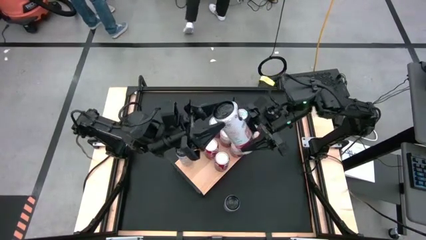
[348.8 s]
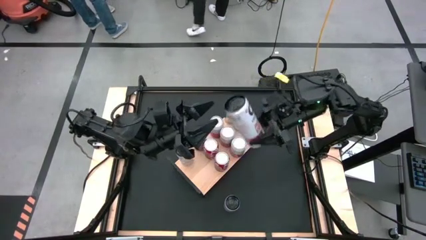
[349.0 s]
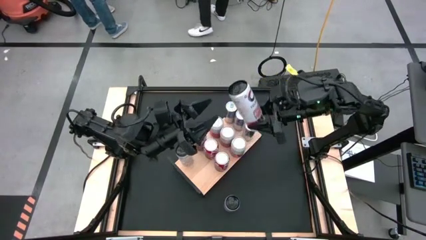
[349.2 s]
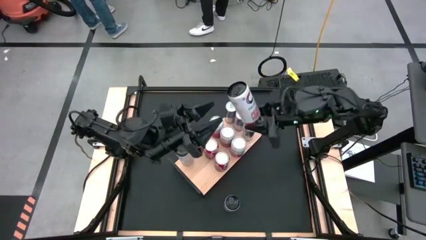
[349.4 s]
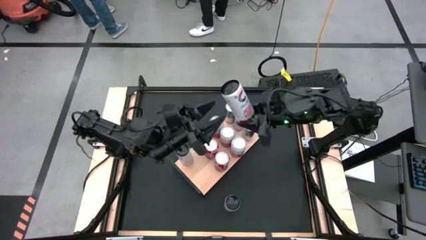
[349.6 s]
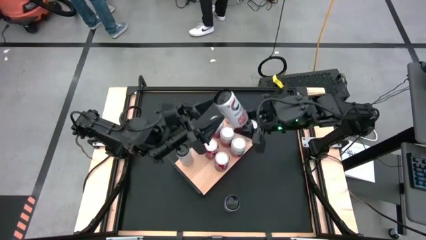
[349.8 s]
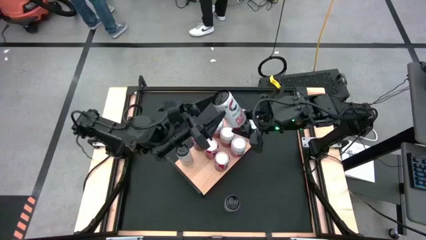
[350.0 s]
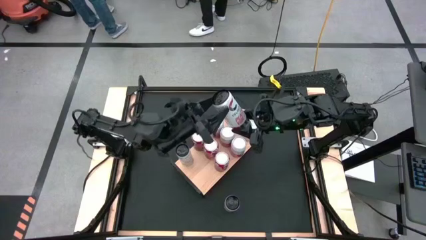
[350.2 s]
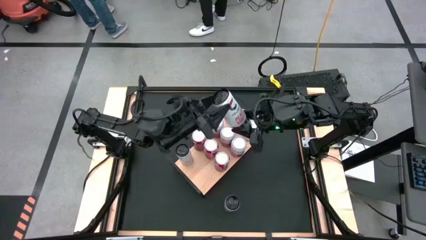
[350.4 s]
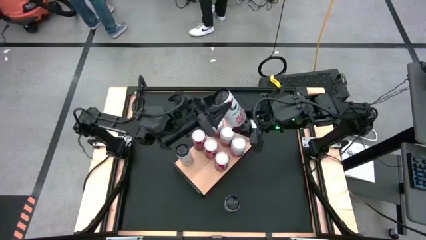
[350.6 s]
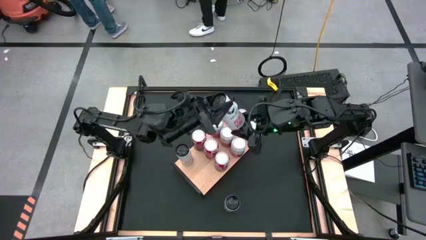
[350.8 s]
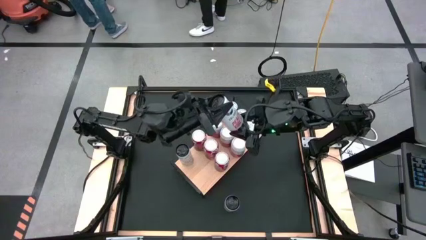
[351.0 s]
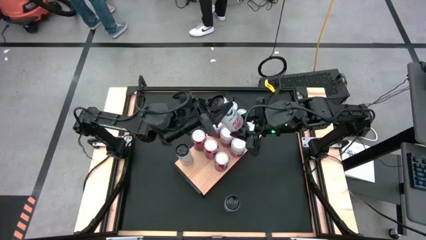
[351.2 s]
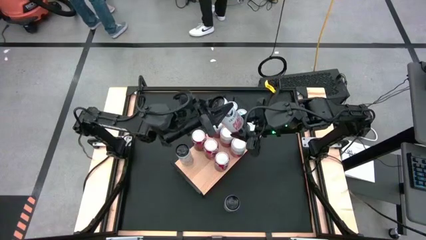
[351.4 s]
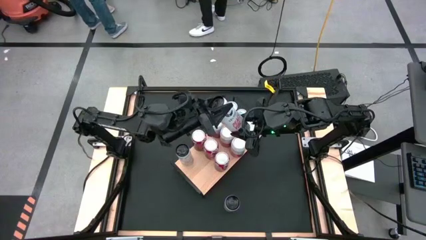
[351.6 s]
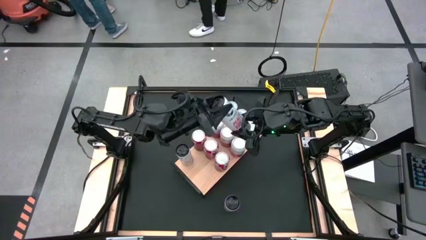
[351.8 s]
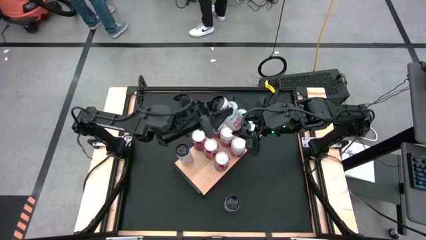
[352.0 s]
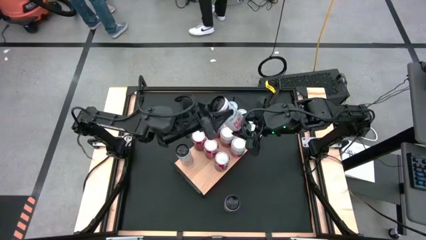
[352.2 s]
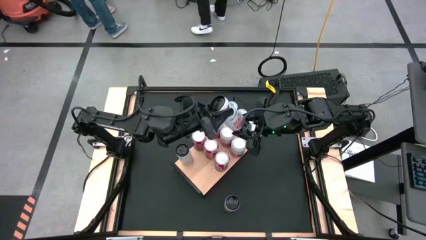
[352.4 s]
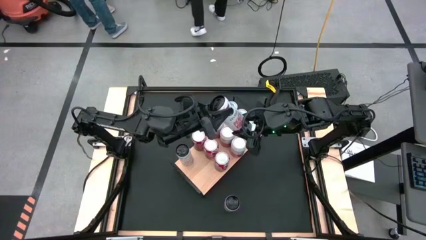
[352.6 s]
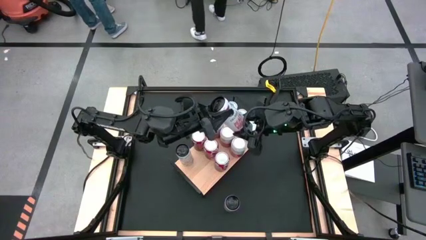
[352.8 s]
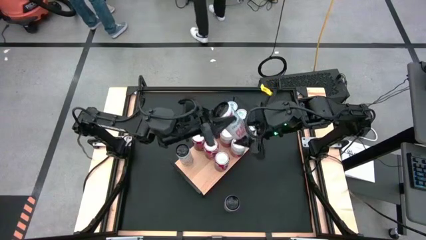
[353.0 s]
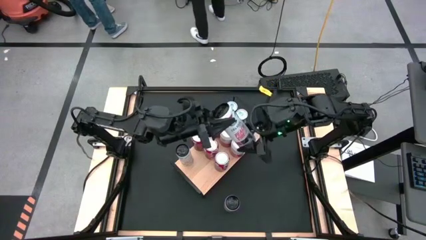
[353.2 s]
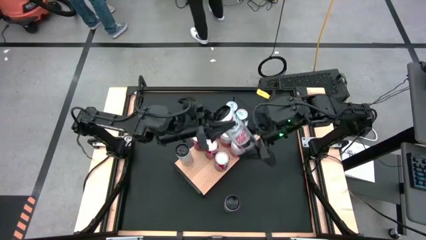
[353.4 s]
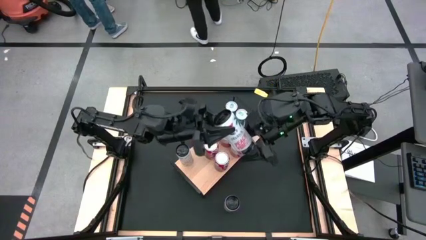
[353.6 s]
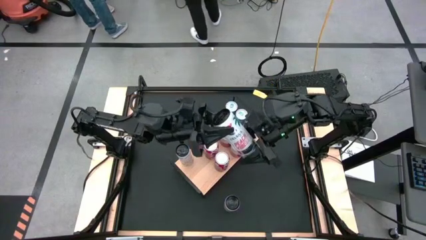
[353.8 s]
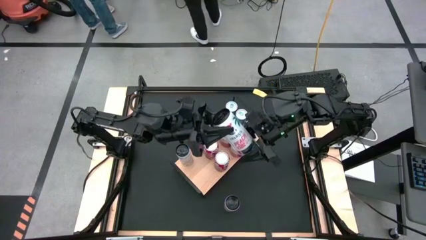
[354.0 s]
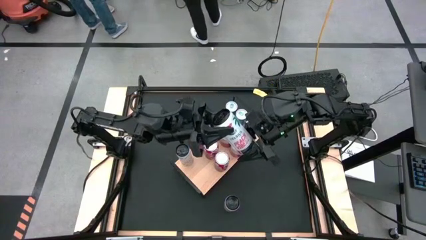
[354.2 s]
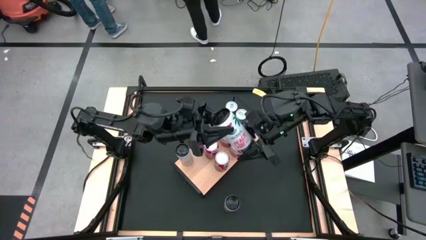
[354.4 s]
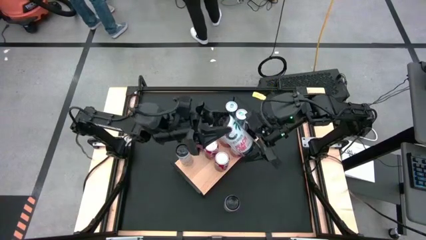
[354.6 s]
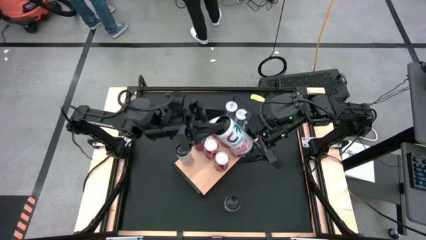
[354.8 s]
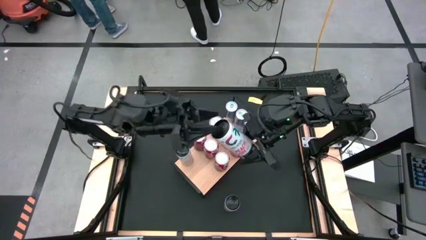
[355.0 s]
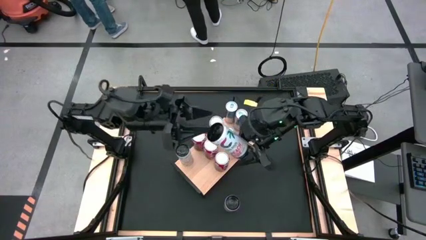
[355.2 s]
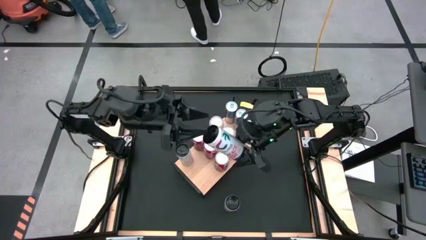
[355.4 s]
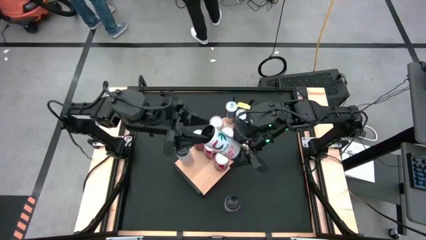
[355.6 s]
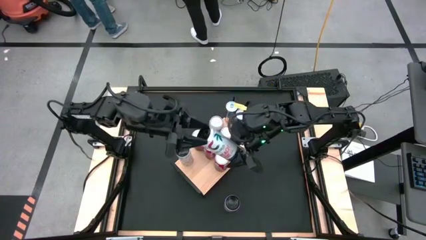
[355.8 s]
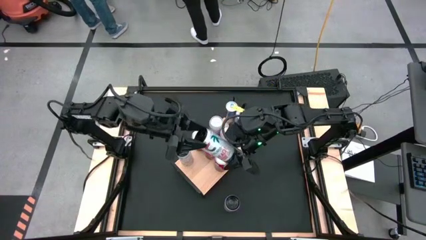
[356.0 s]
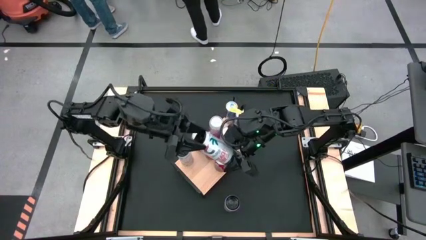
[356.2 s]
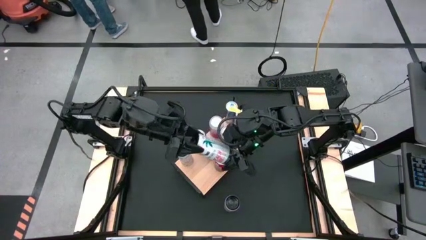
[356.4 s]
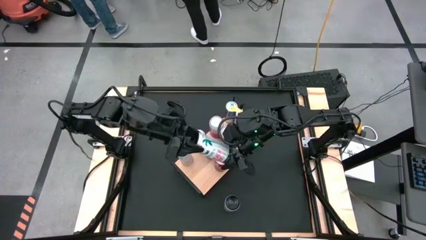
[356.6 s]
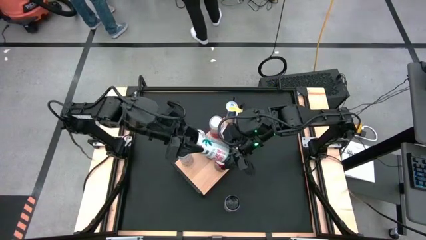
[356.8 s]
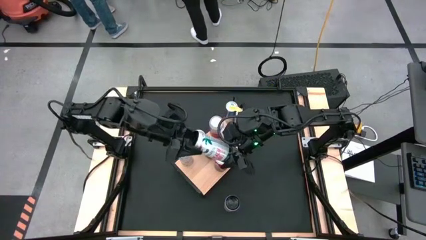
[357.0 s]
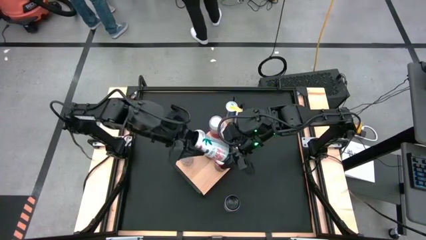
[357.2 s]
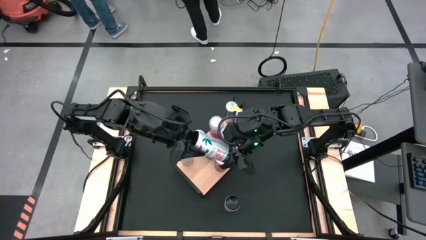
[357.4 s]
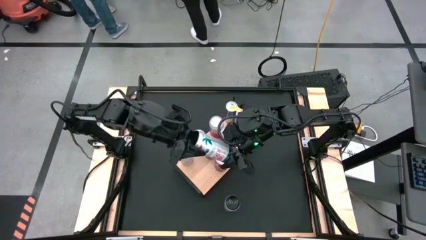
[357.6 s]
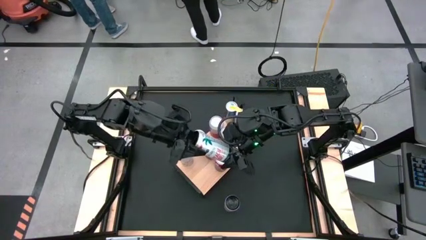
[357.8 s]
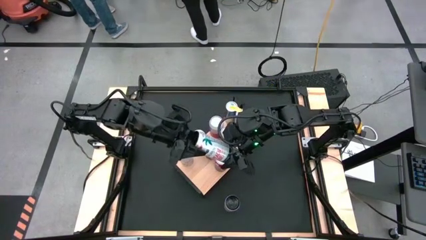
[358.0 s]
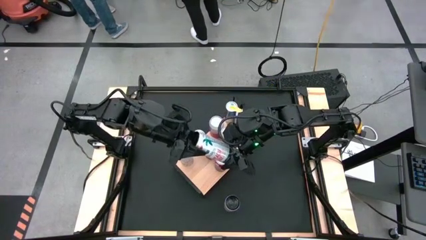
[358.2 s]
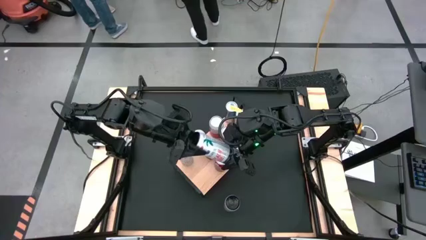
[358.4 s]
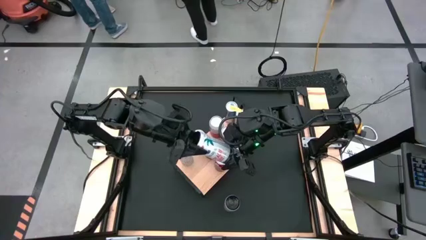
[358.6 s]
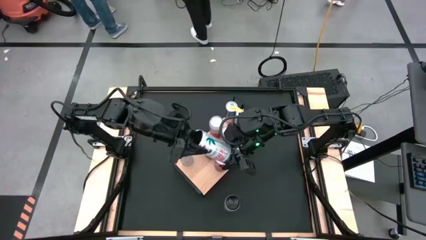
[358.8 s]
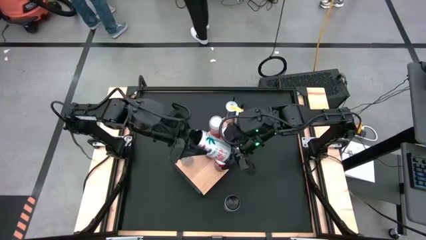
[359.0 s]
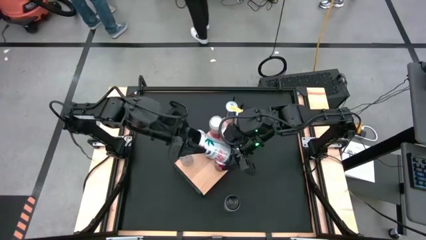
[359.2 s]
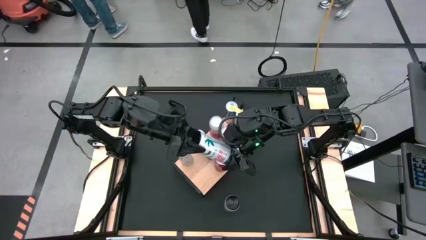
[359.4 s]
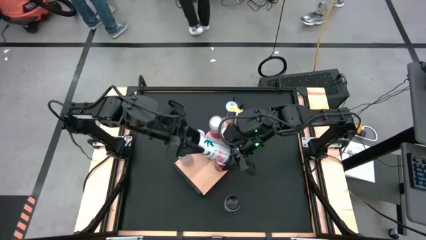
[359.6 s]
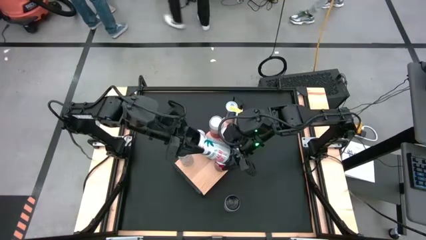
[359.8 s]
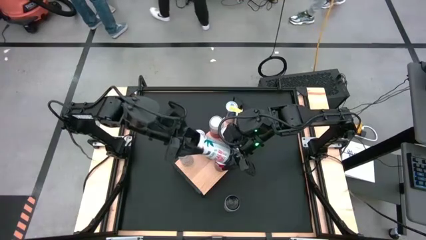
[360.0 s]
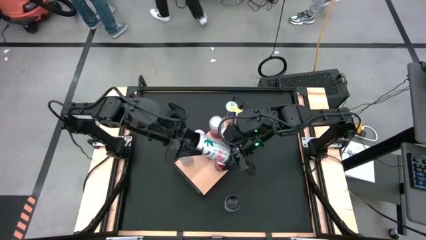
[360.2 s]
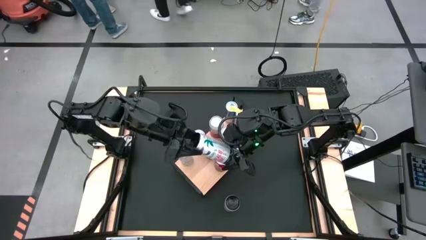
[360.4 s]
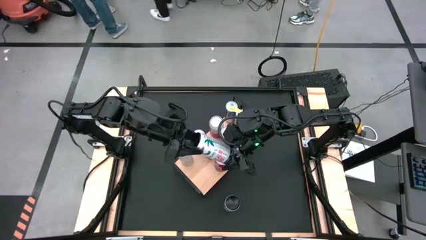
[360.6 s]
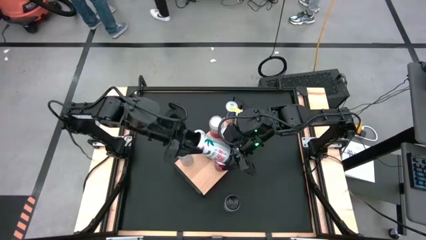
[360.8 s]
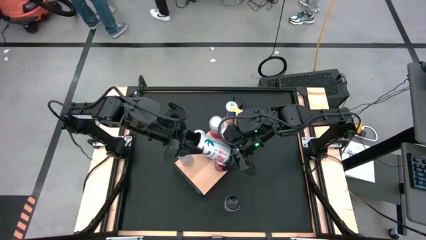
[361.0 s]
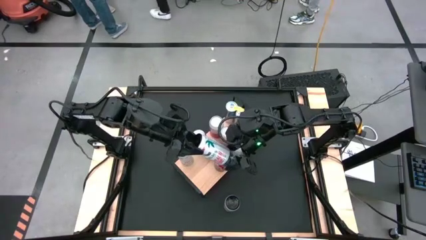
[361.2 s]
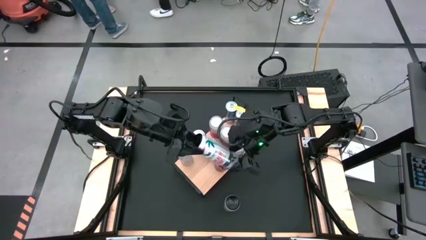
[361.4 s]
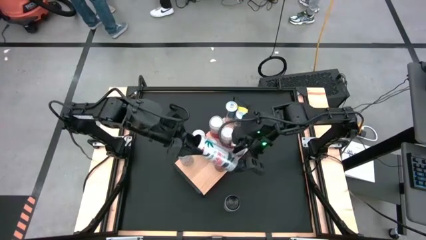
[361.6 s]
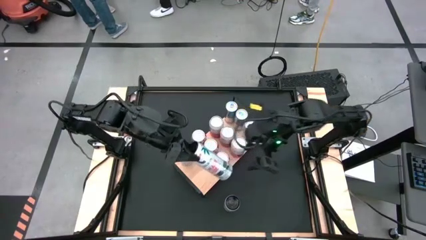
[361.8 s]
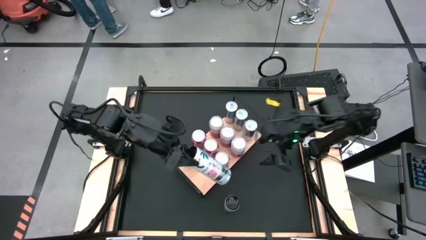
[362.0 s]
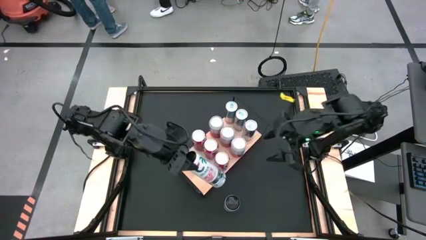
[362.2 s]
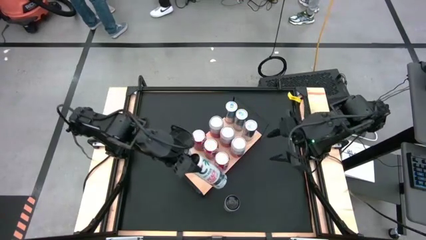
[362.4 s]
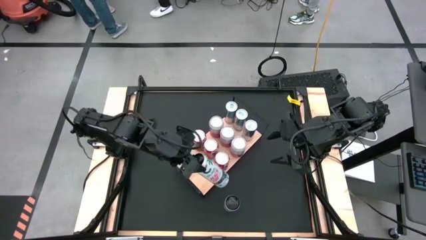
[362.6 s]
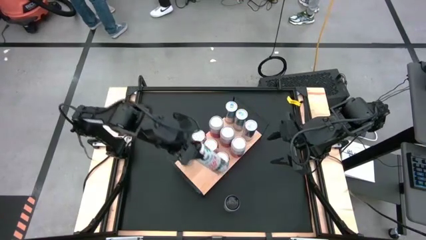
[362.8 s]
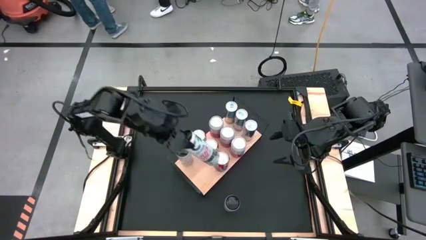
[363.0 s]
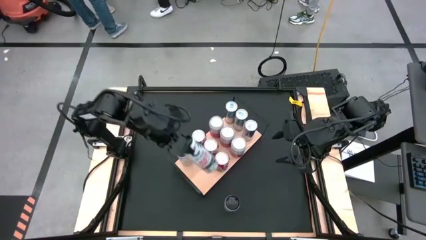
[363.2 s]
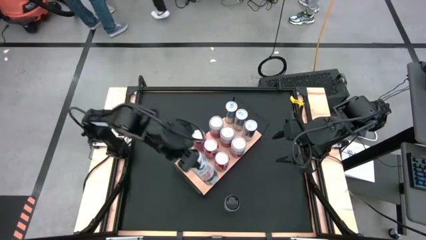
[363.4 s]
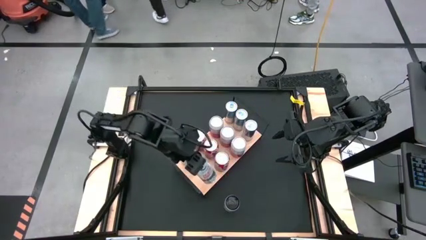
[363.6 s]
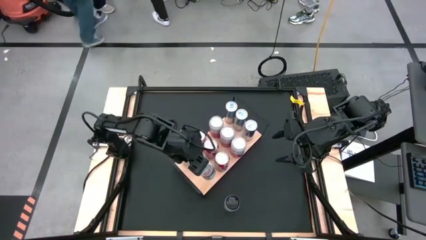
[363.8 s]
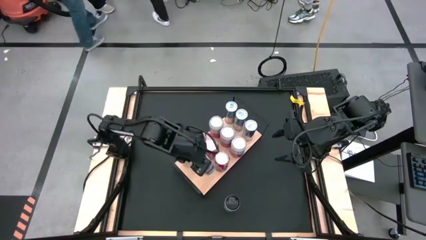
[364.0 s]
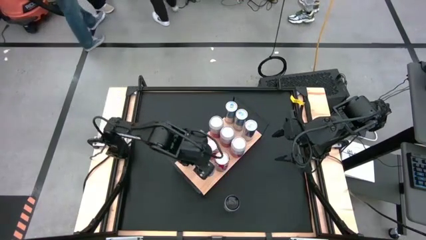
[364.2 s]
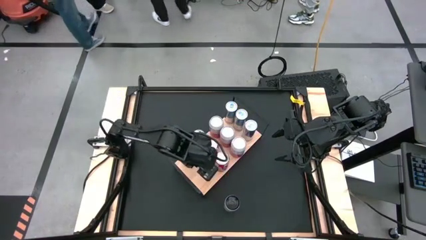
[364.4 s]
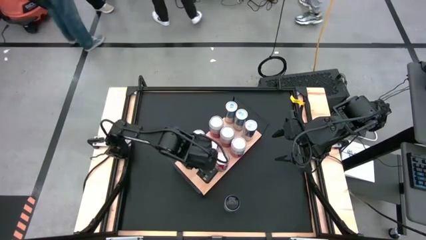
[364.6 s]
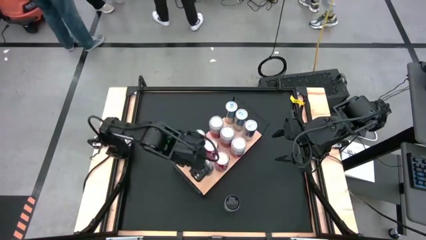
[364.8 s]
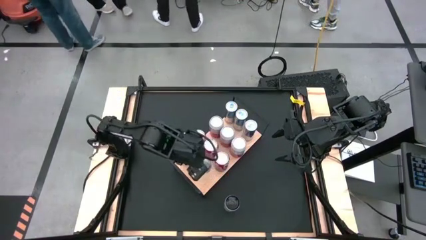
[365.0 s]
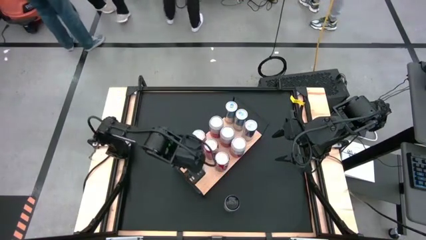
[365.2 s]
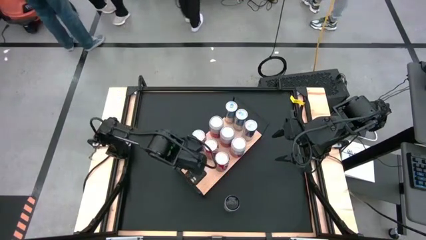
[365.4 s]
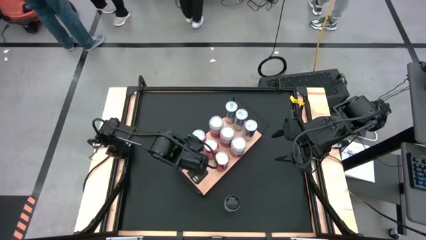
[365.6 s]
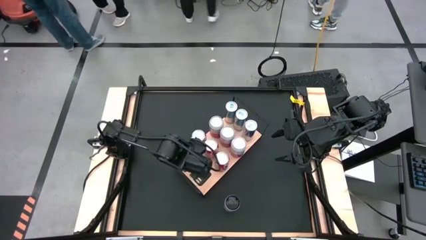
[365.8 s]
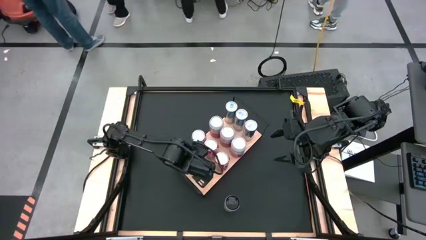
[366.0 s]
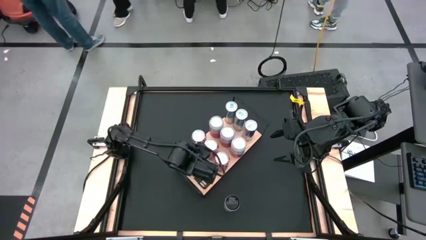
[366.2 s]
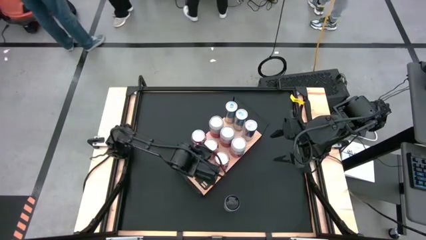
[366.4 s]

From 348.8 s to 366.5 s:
Task: Place canned beverage on shelf
Put the right white pink soda can on the shelf aligned with the other white pink soda can
